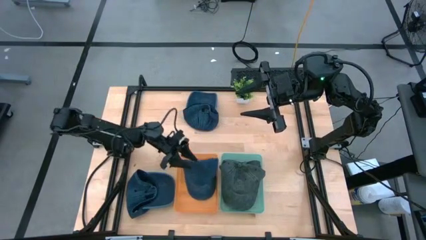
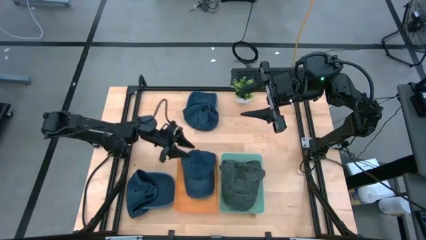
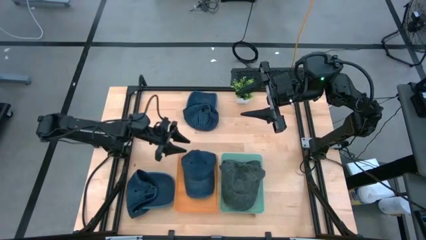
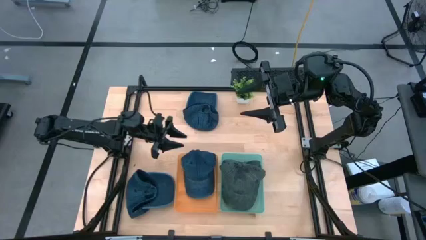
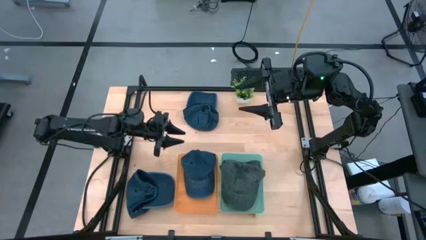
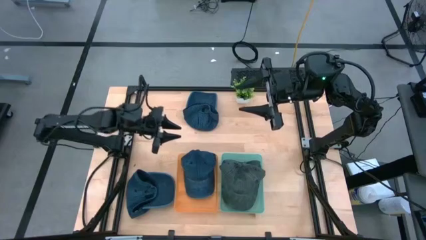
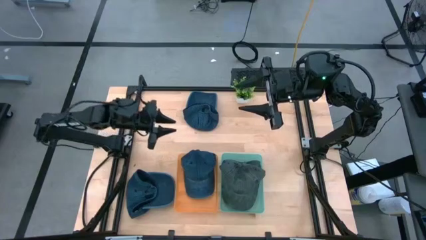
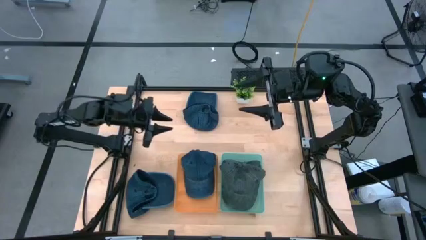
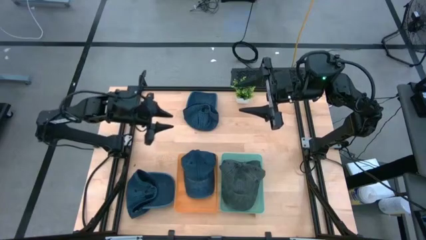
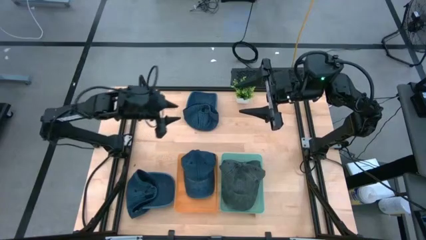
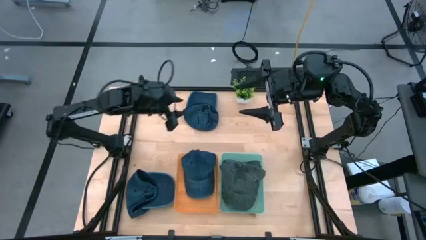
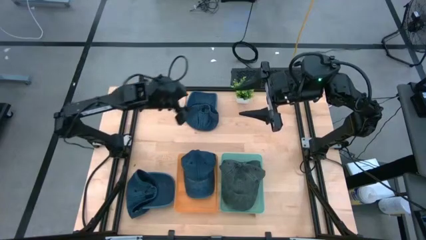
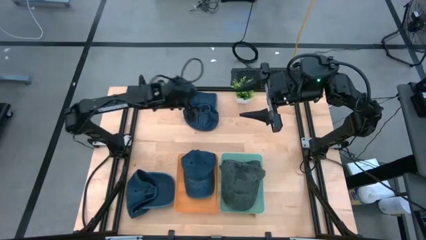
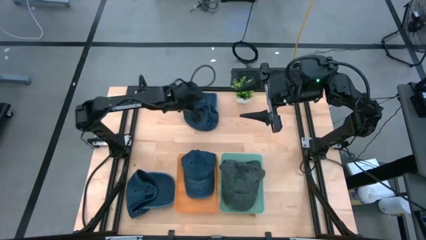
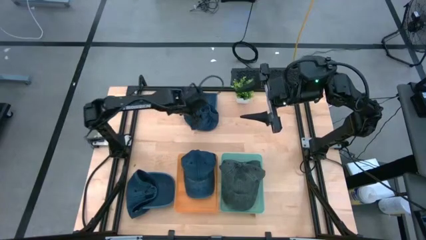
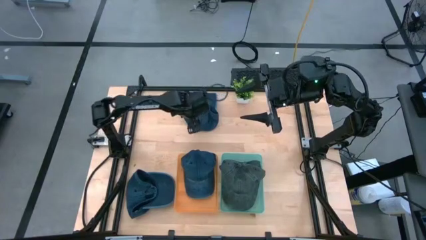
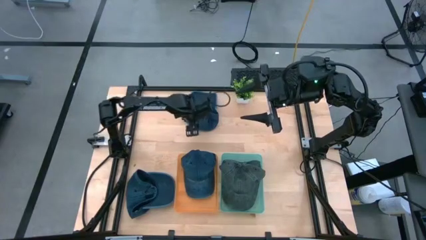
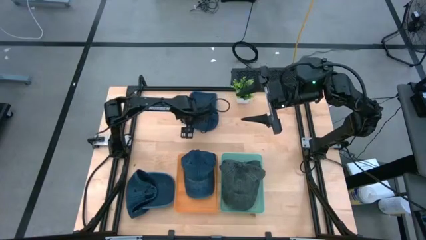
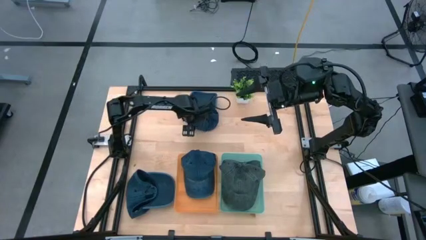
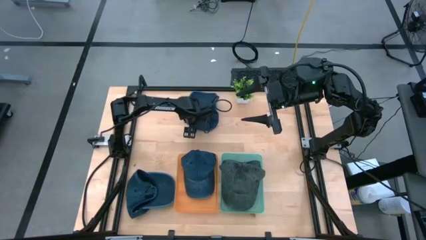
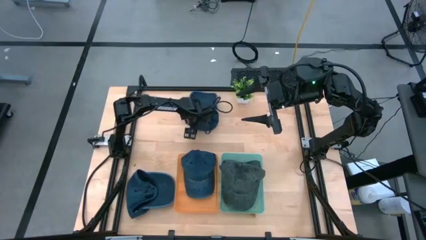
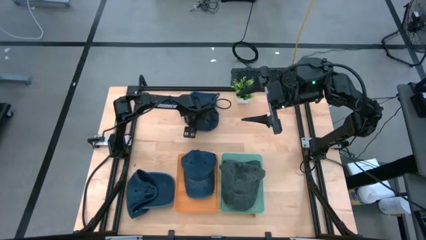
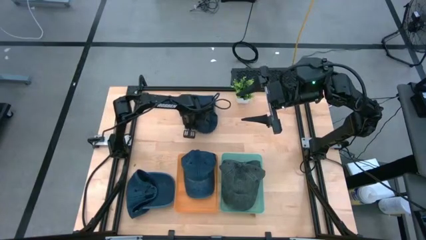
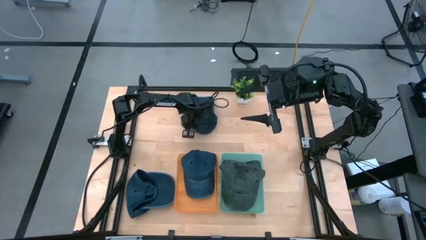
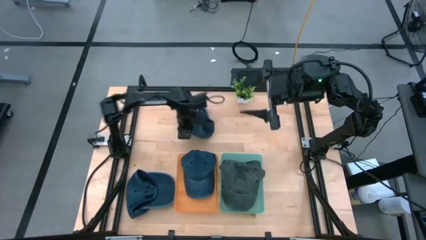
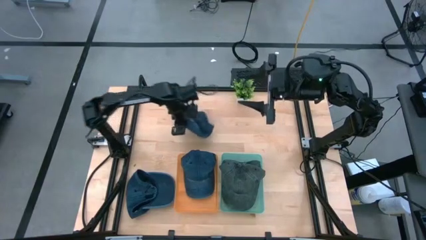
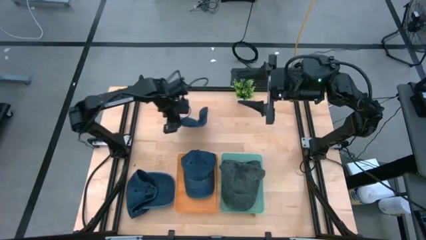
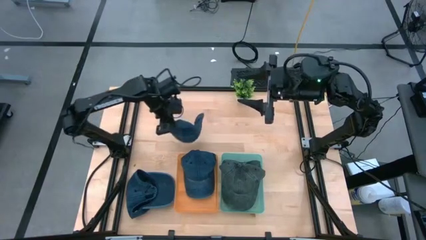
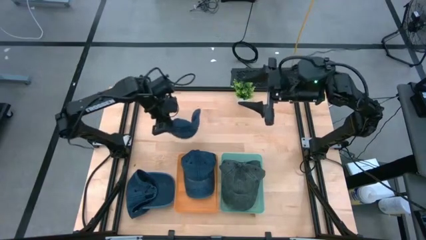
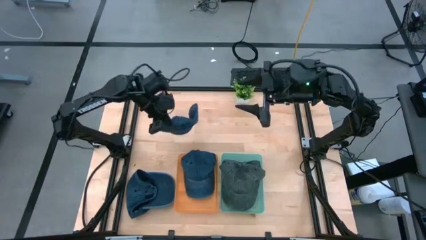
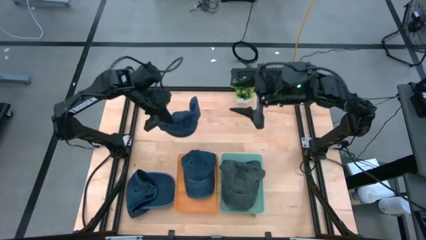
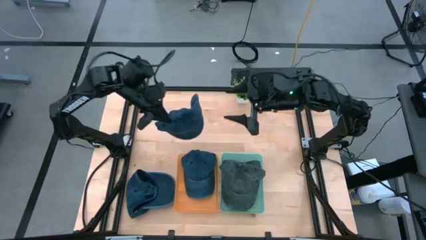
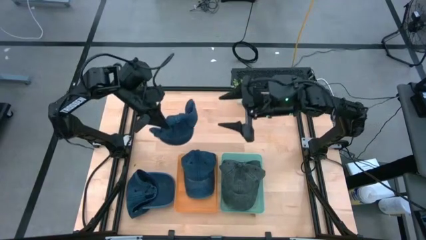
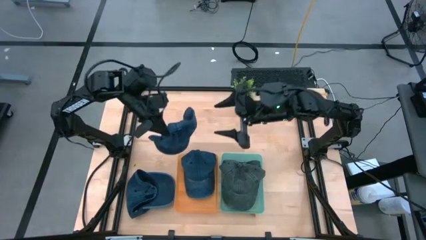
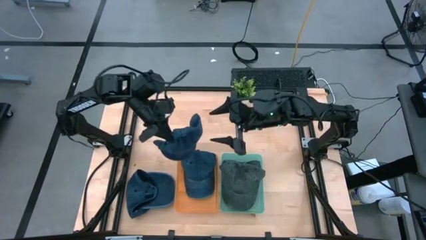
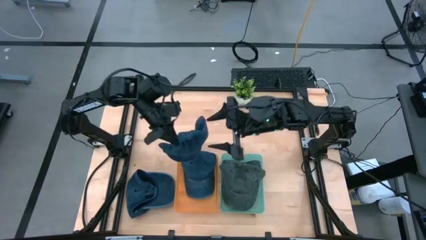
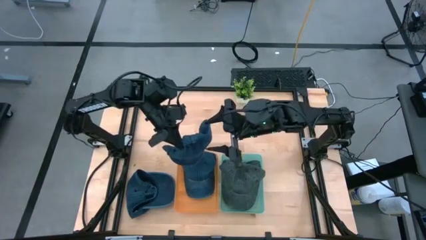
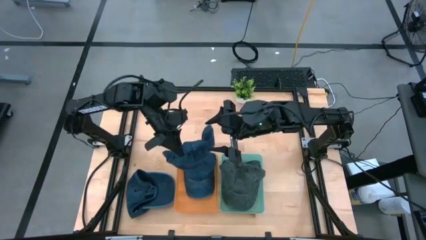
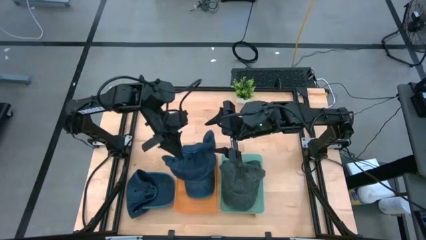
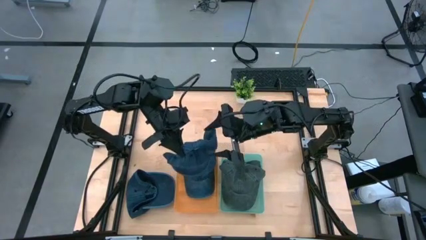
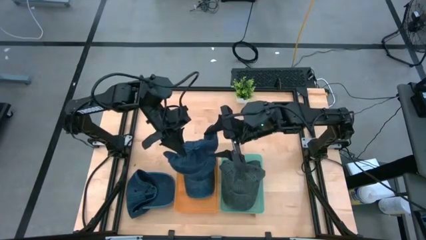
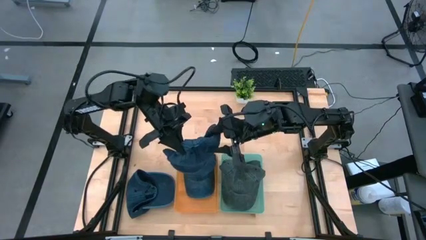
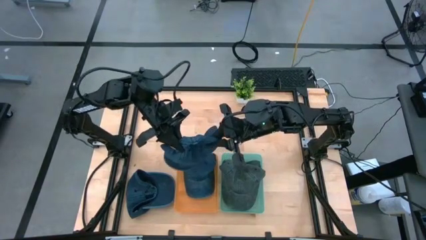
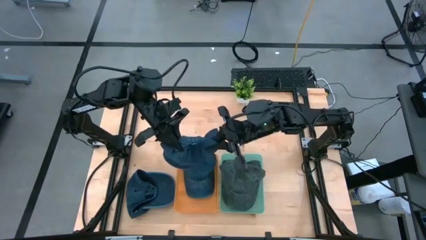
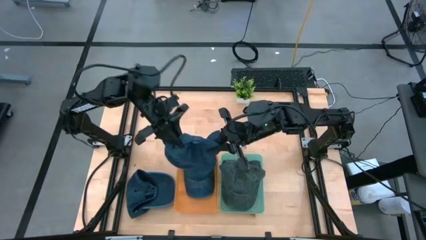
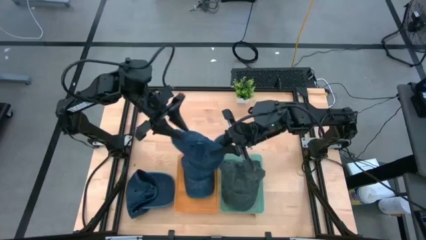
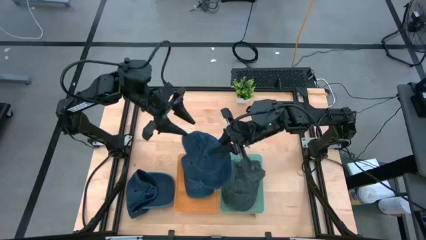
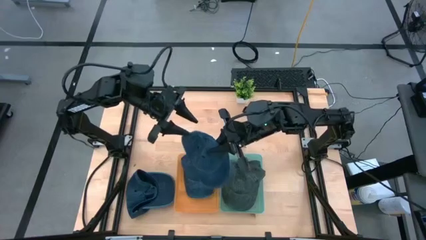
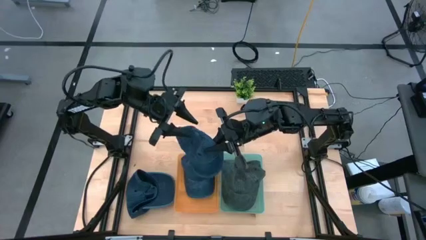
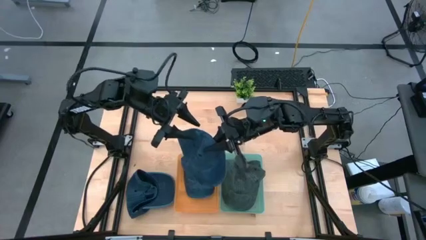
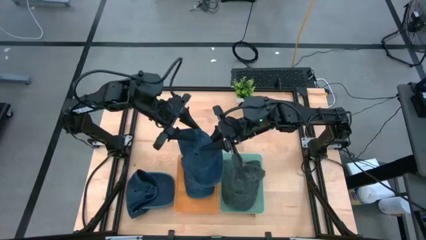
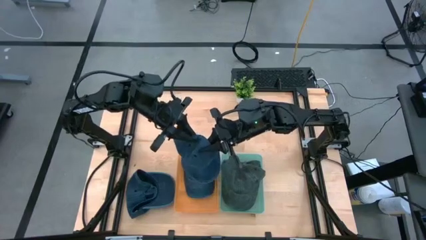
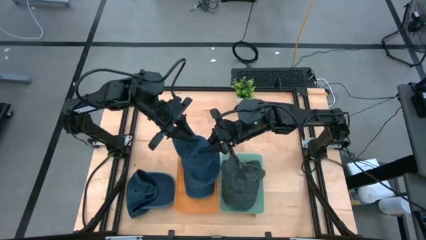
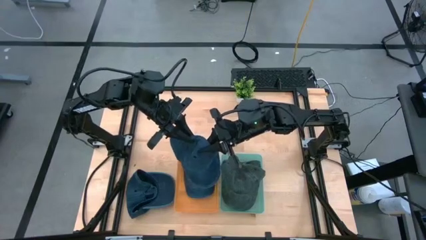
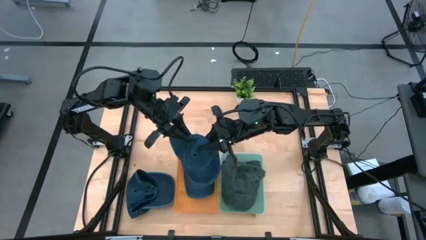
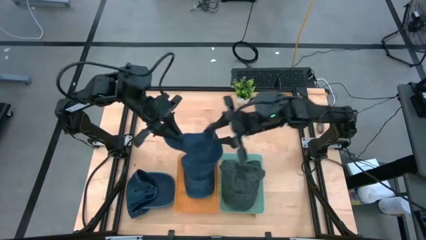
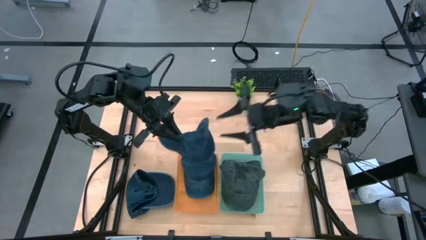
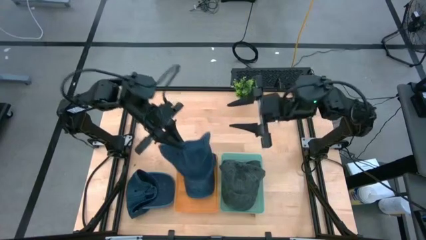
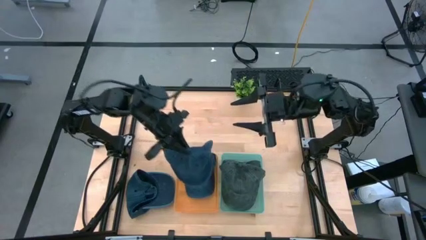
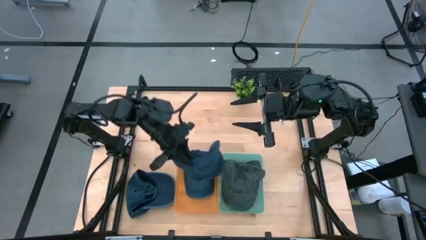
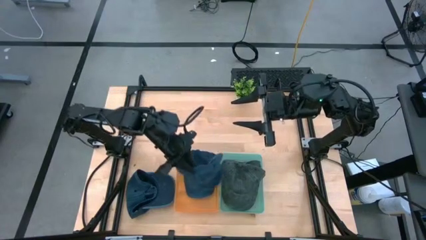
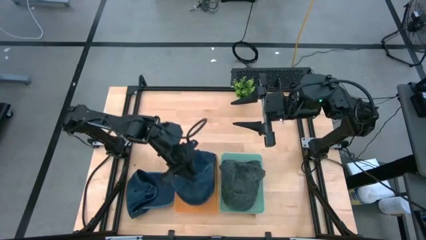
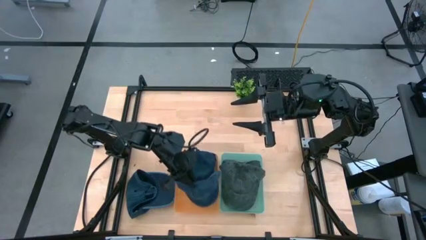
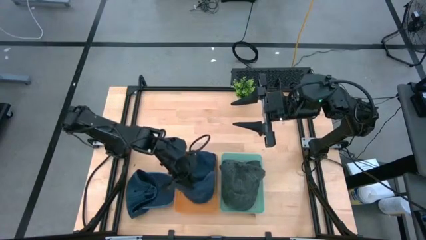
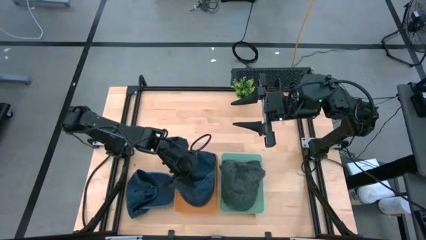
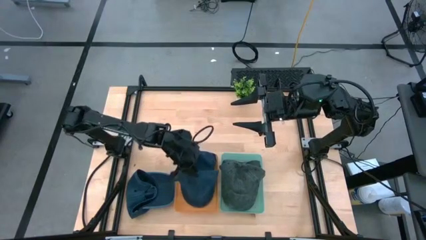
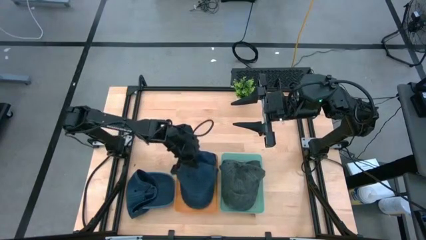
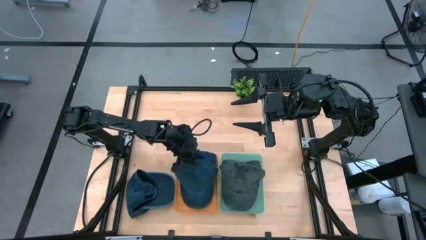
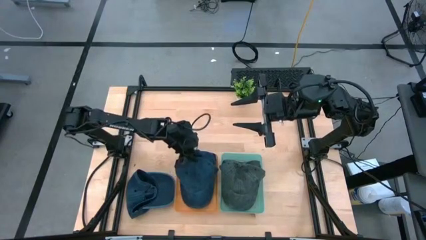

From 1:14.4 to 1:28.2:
Task: Pick & Place hat
Put the top blue cap into the orange bin

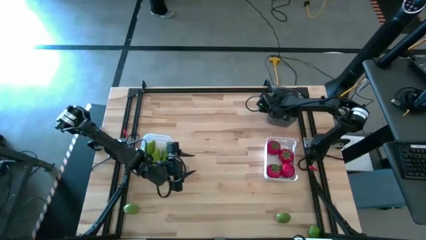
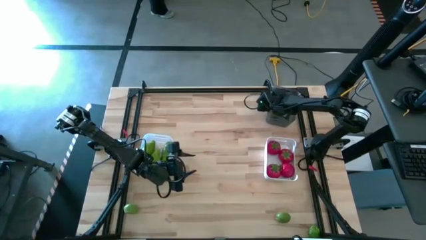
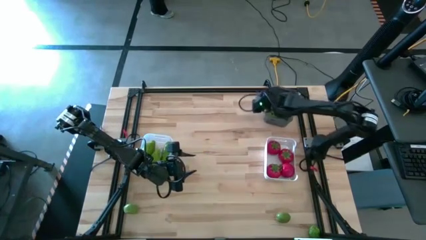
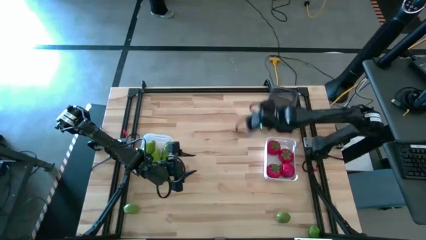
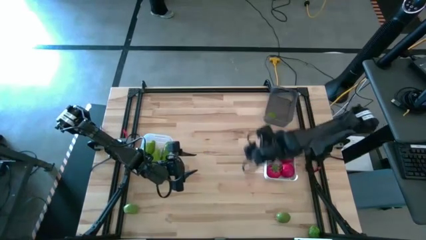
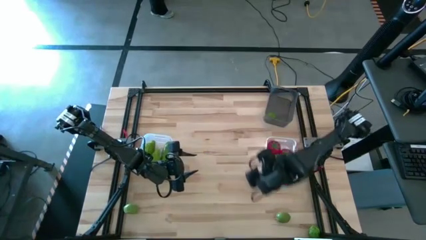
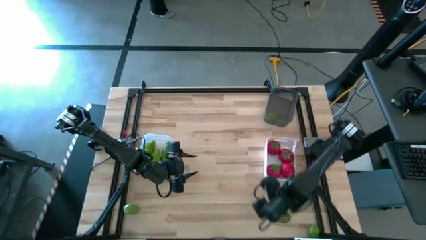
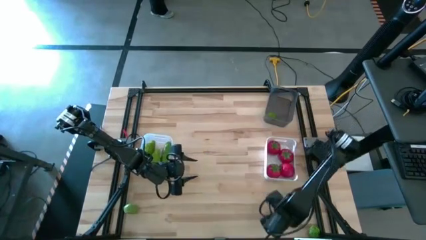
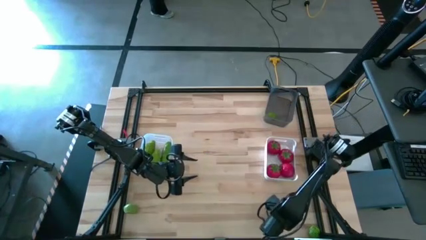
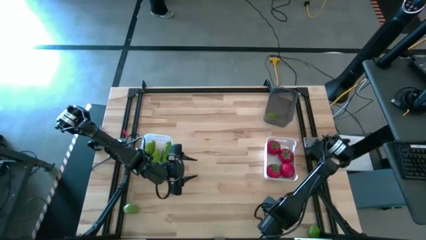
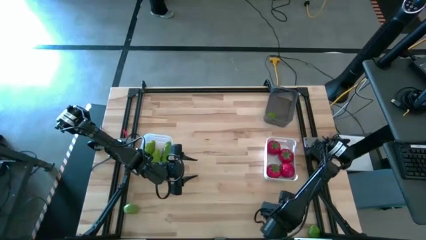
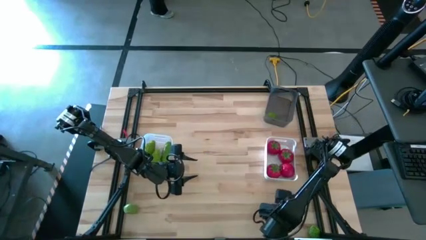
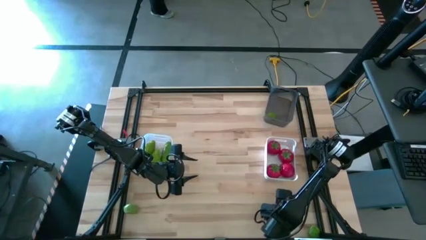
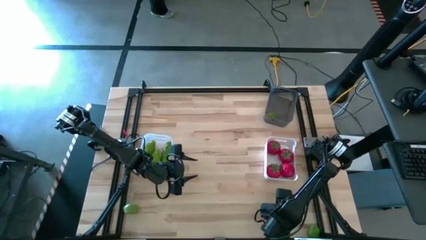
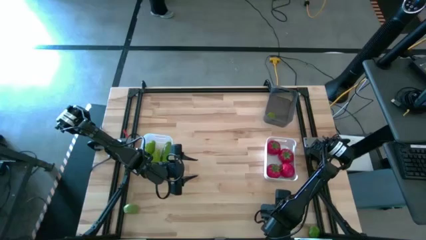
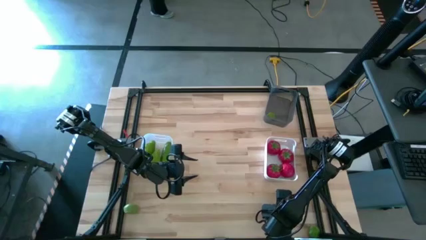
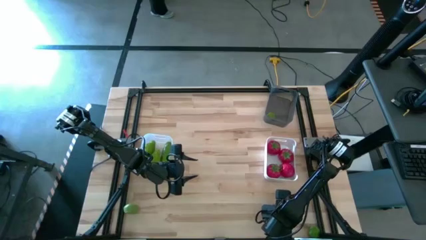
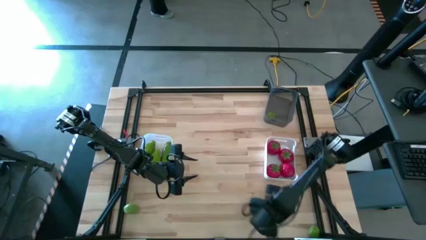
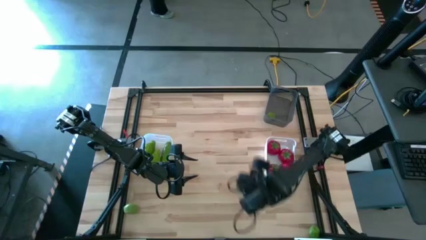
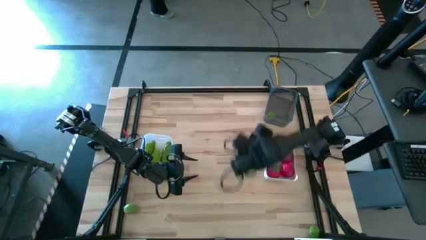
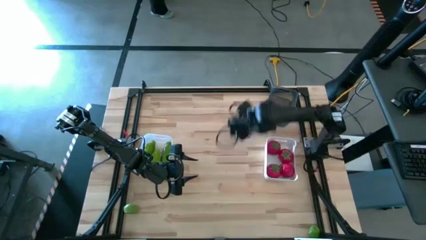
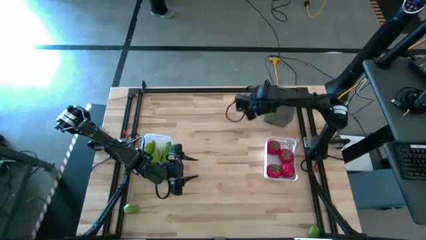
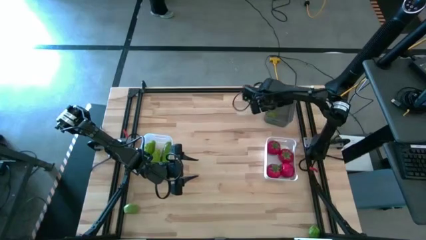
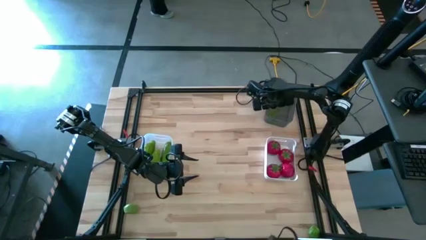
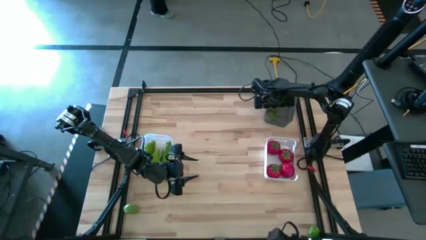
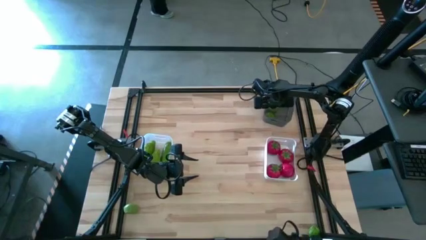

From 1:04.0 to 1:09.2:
Task: Sort produce into baskets
Put the lime into the black bin
